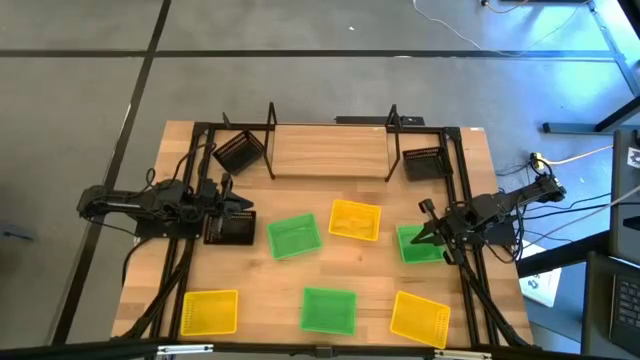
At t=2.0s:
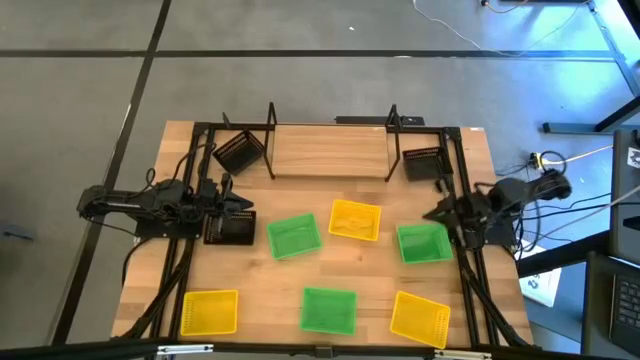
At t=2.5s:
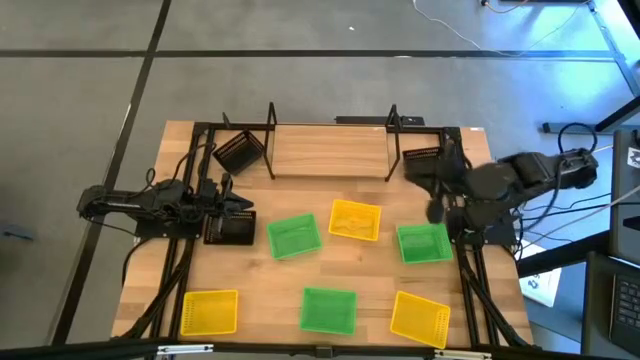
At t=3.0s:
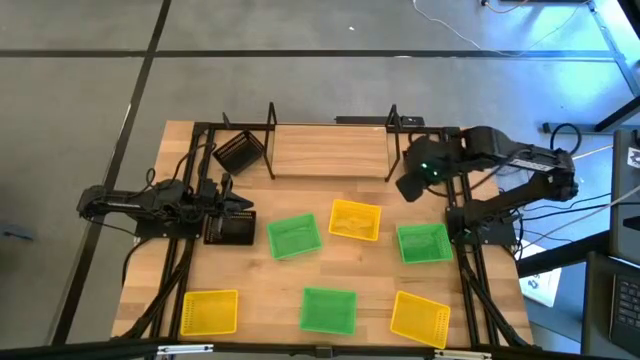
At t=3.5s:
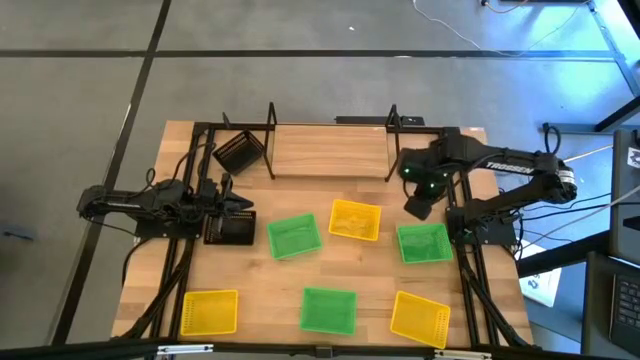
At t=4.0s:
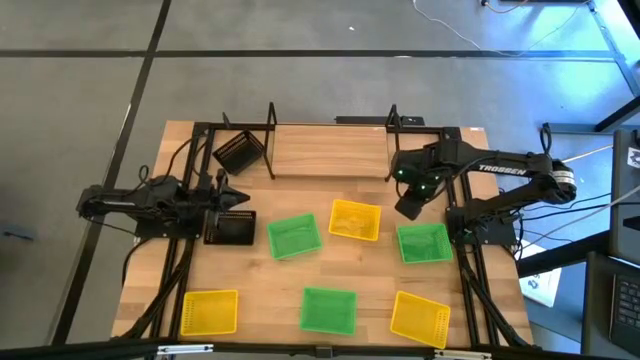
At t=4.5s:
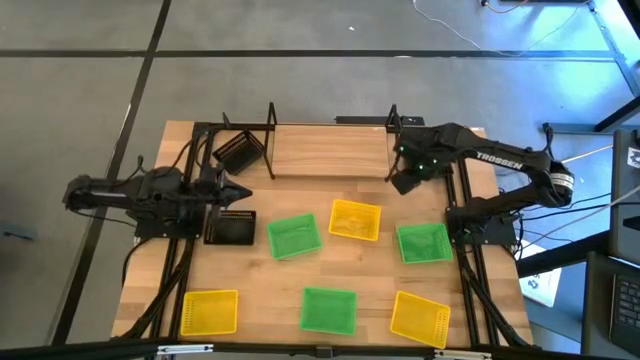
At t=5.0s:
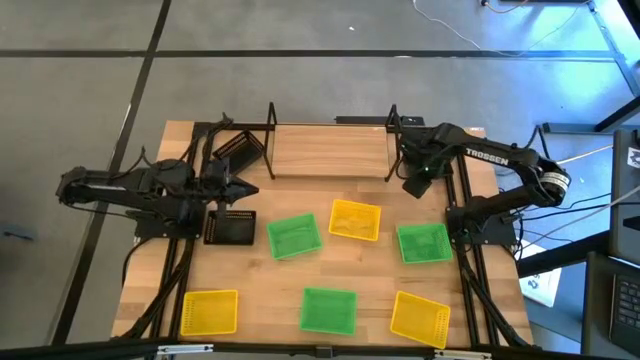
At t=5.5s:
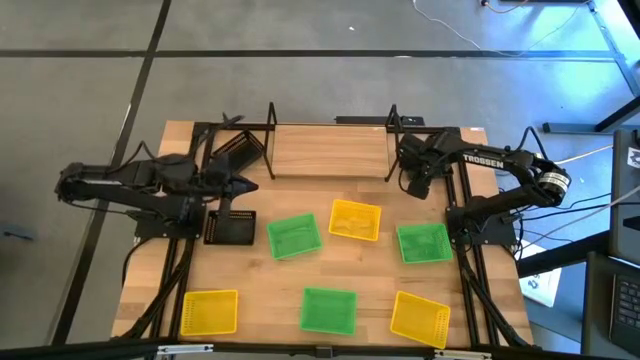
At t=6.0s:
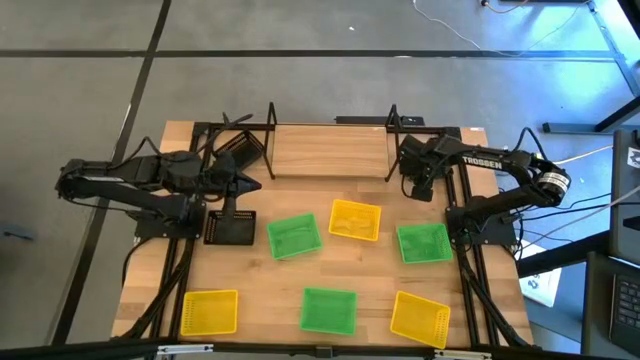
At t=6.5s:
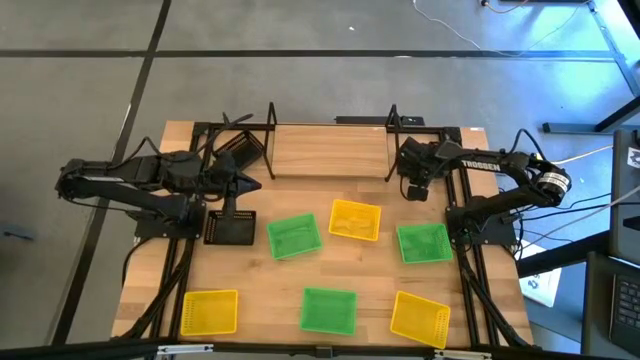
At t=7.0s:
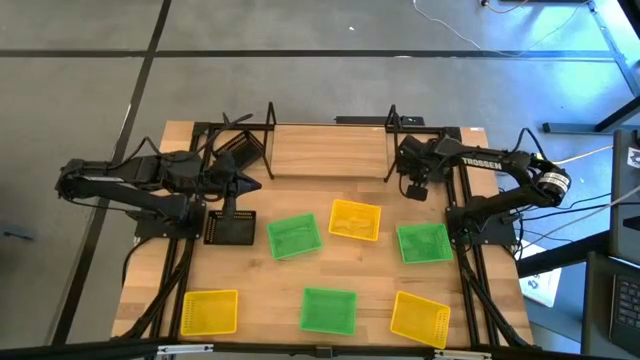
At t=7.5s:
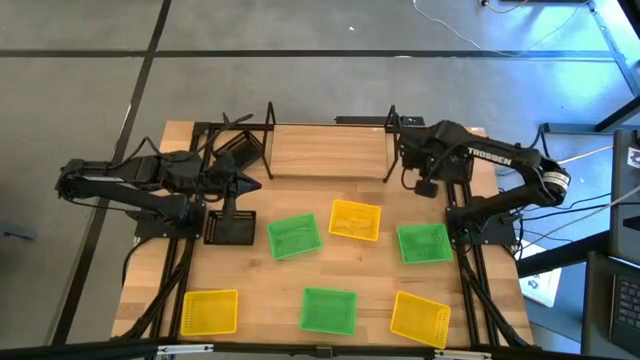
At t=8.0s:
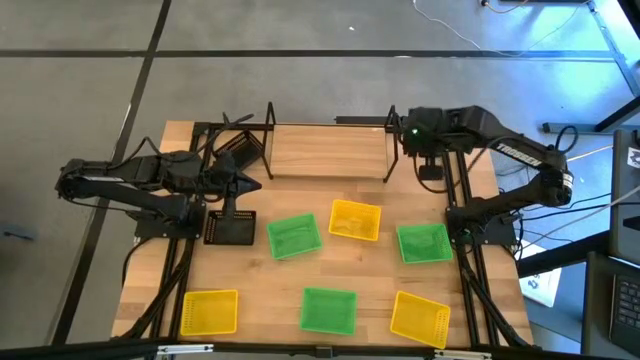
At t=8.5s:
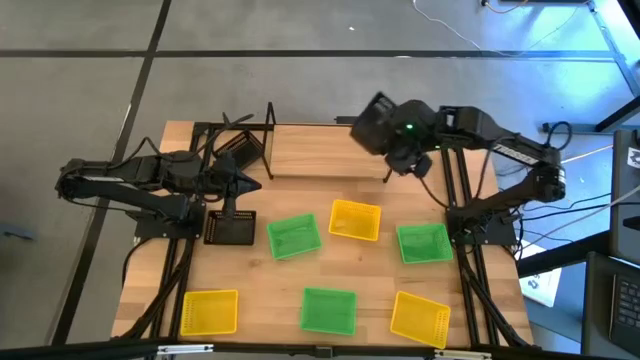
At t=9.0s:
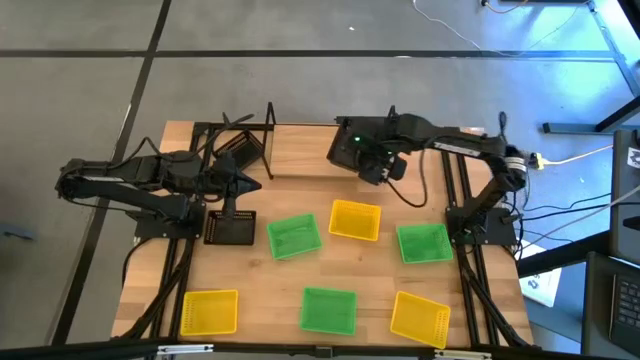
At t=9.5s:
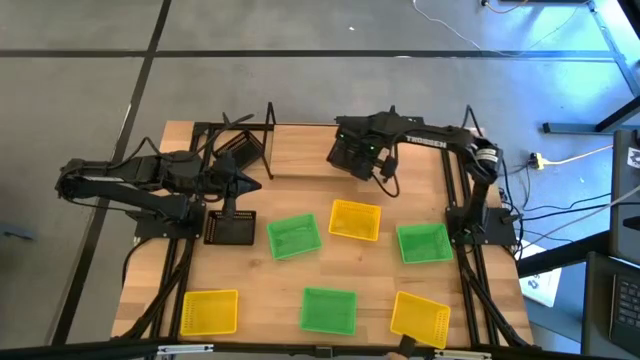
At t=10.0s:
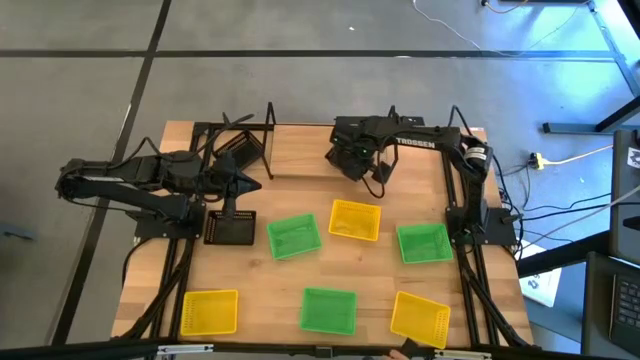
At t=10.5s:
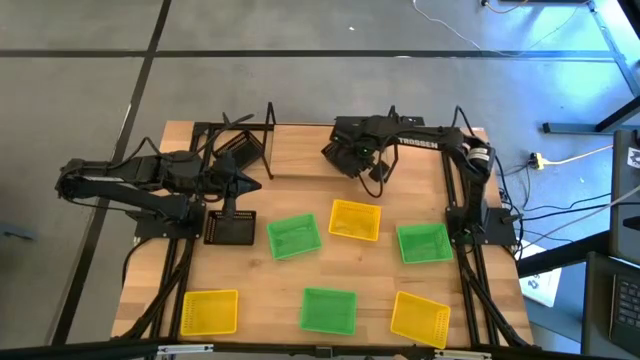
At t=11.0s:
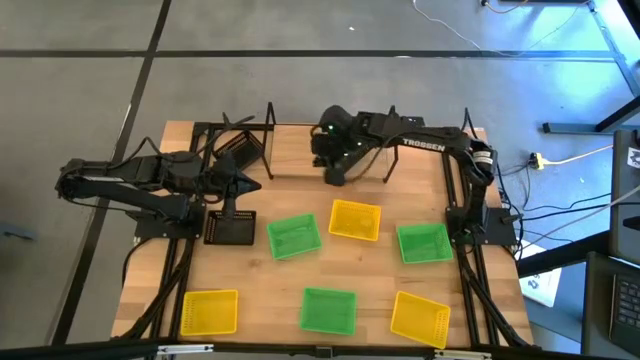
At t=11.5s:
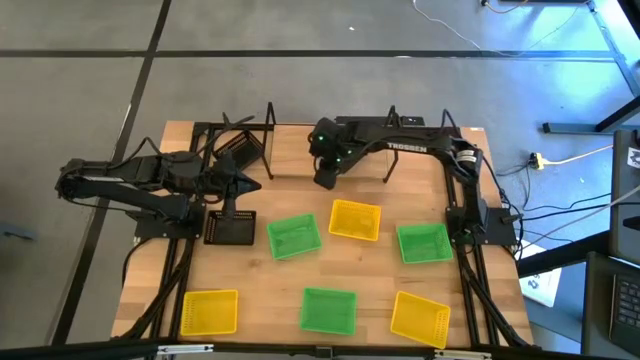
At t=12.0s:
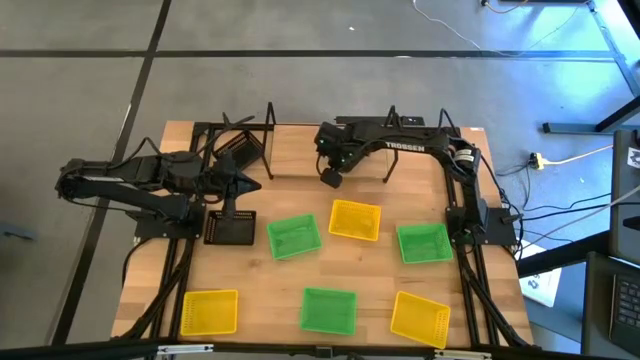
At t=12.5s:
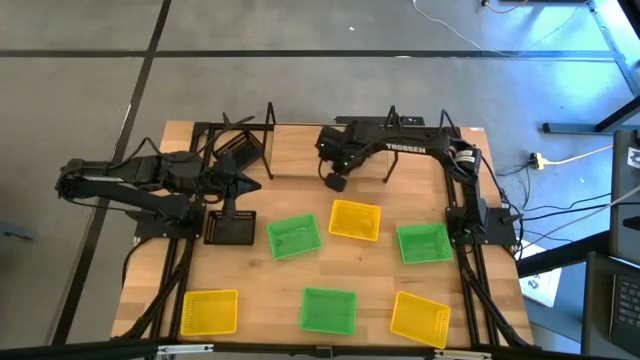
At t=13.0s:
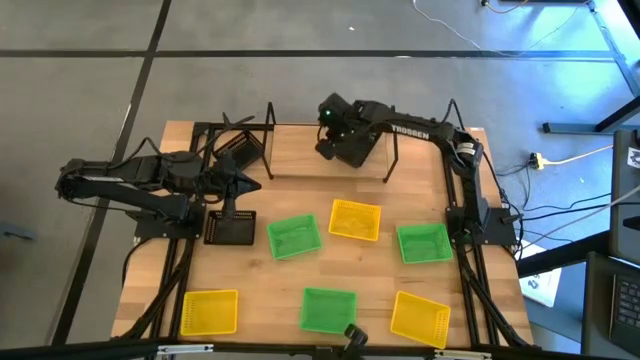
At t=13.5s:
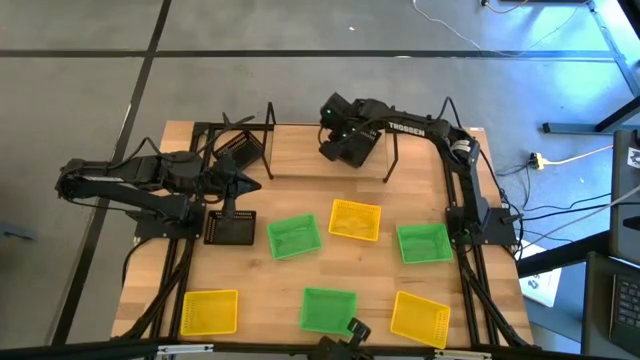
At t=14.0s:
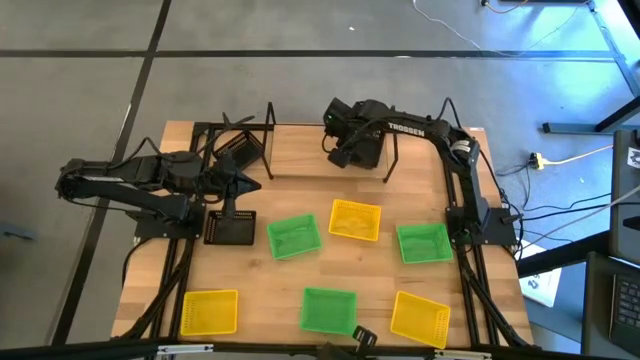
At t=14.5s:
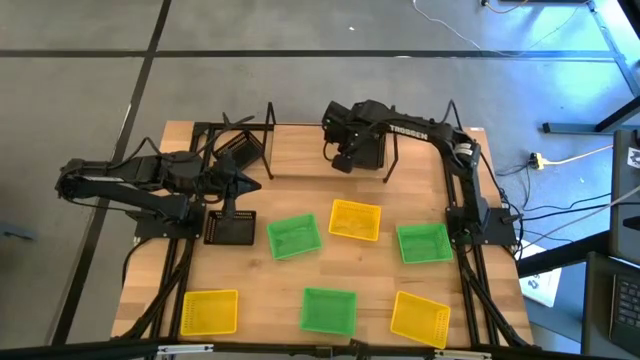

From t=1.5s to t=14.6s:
Task: Stack baskets on shelf by color
Put the top right black bin on the shelf

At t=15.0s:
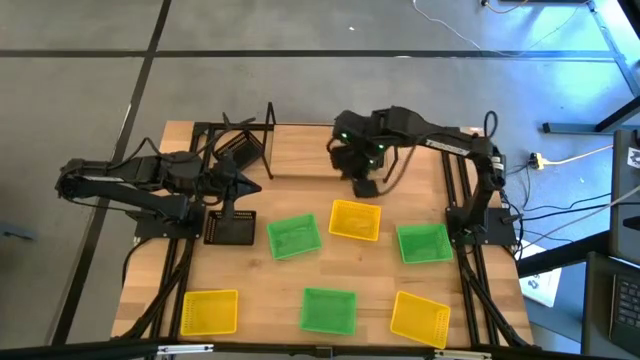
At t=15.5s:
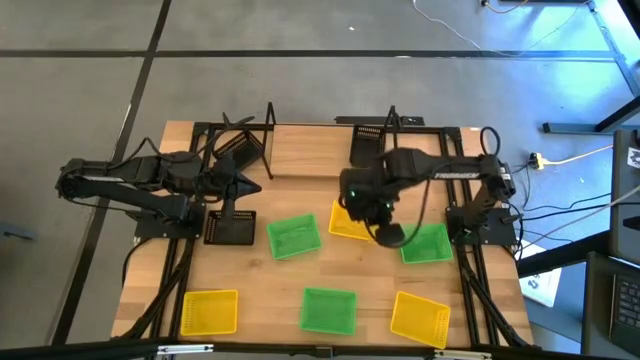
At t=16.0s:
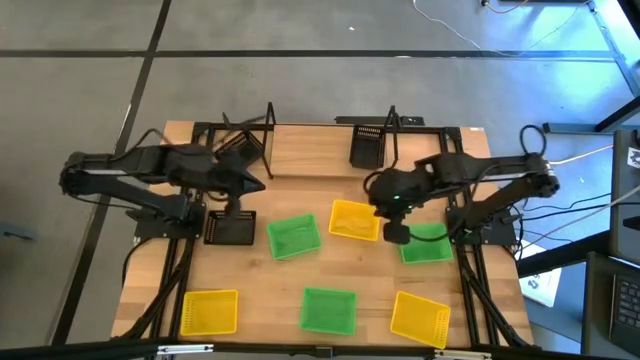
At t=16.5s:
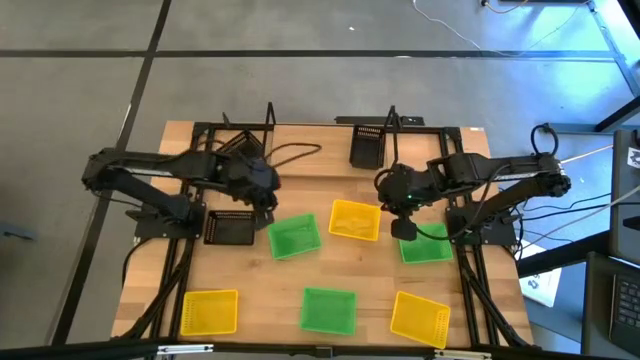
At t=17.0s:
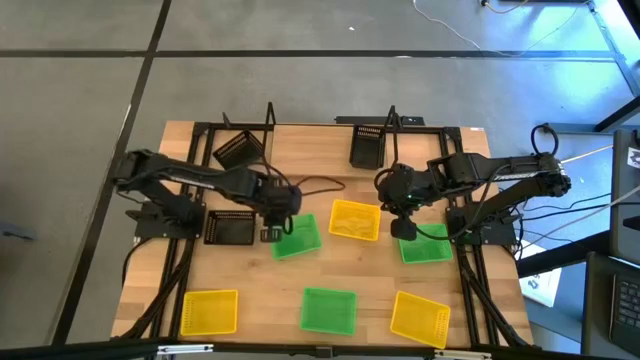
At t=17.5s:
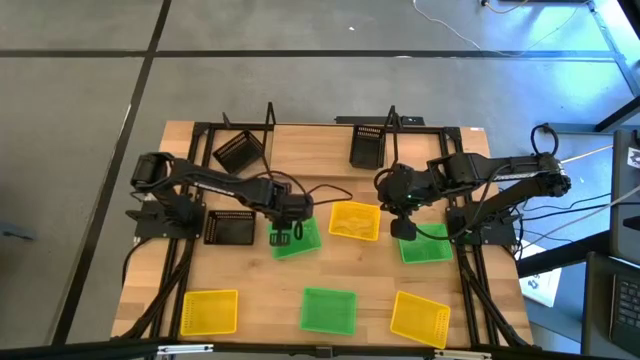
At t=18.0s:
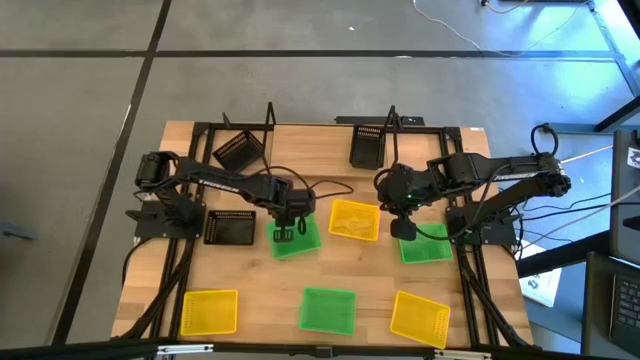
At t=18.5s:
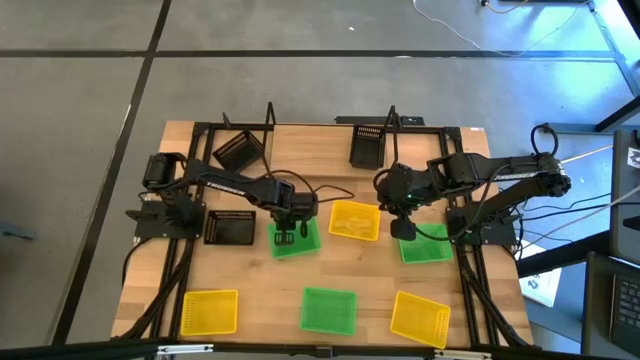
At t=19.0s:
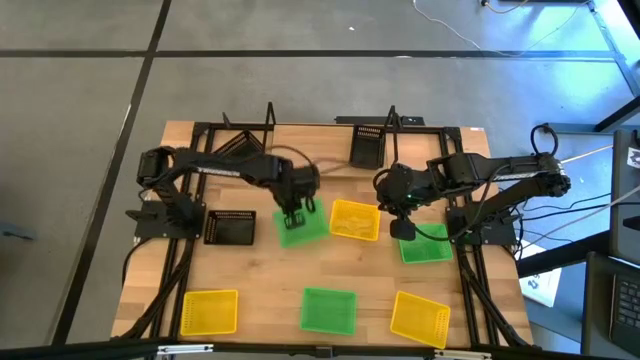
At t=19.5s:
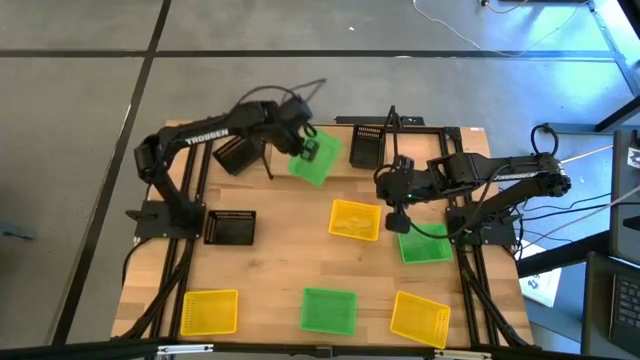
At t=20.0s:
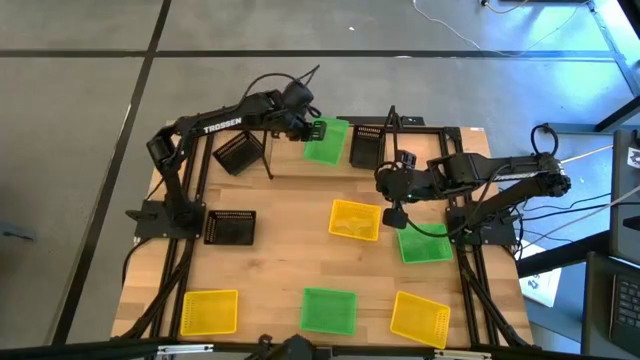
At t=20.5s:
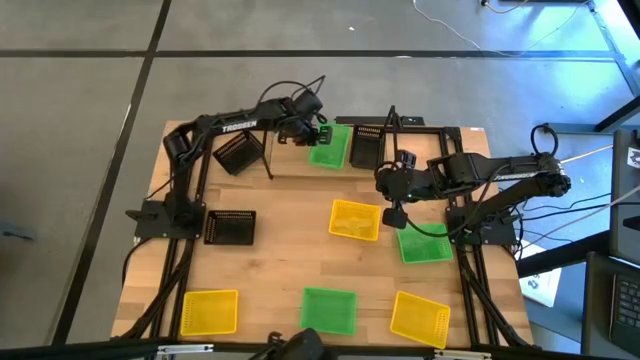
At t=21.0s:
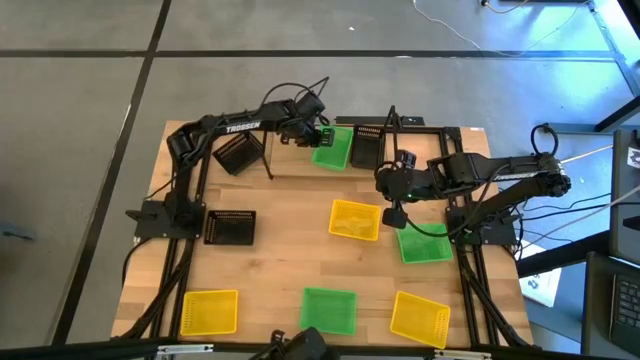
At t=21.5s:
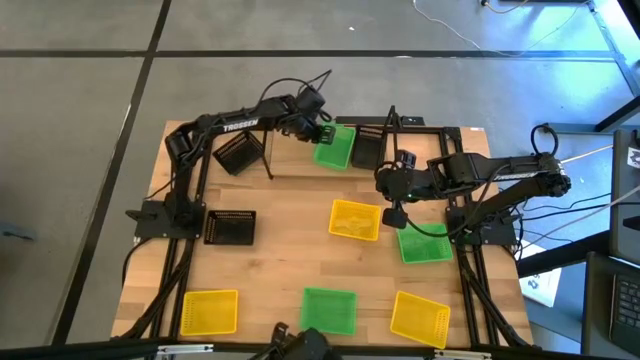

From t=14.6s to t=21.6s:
Put the top left green bin on the shelf
